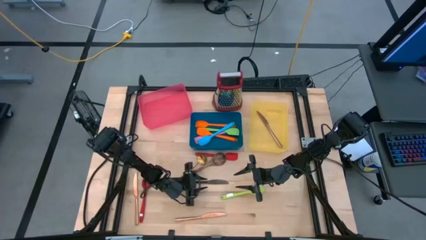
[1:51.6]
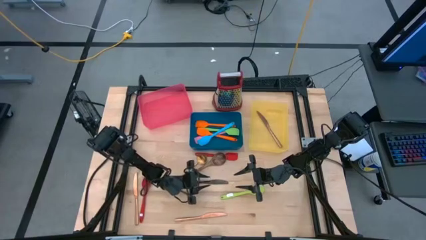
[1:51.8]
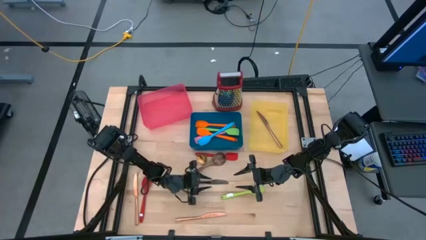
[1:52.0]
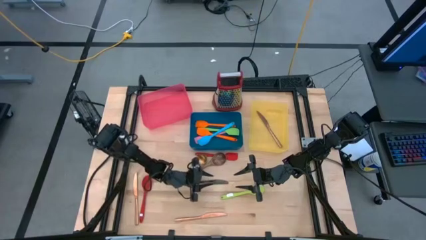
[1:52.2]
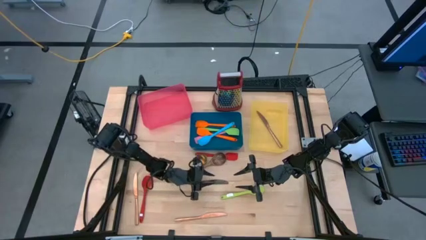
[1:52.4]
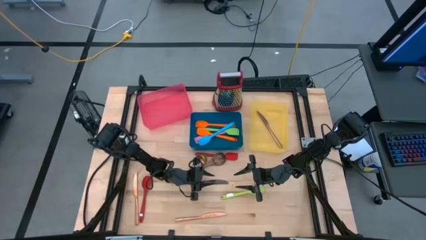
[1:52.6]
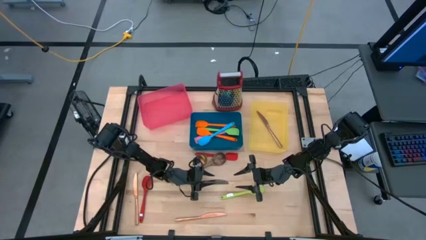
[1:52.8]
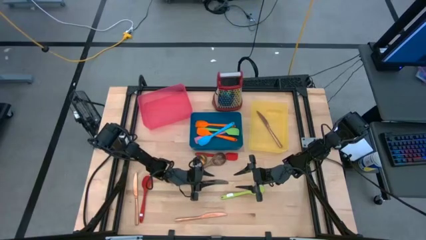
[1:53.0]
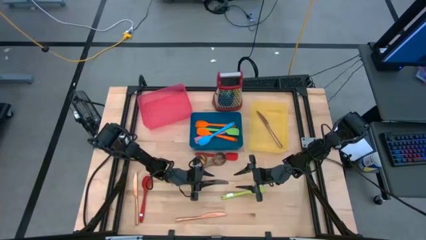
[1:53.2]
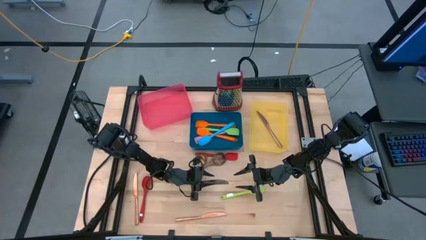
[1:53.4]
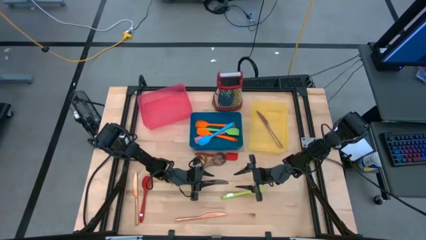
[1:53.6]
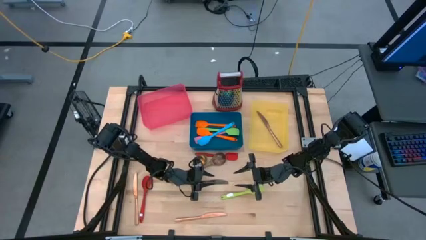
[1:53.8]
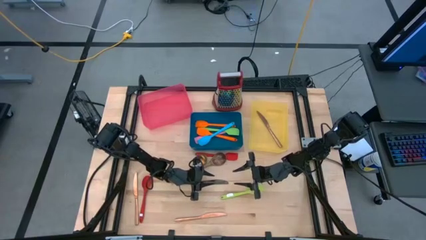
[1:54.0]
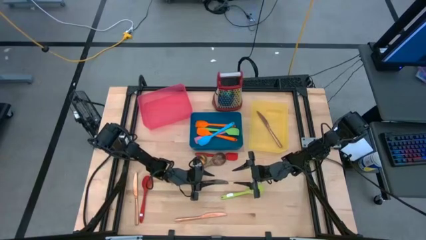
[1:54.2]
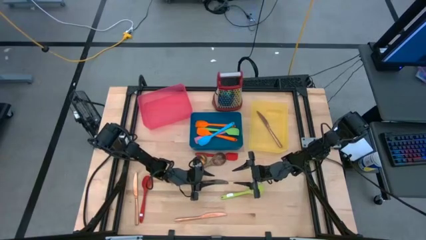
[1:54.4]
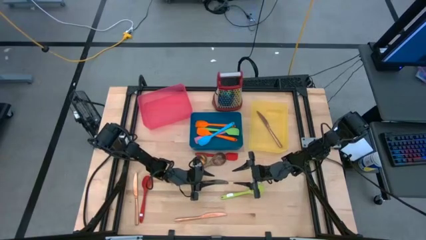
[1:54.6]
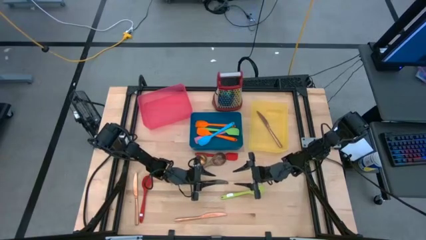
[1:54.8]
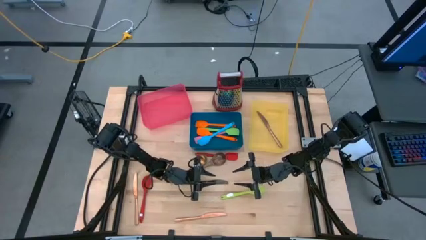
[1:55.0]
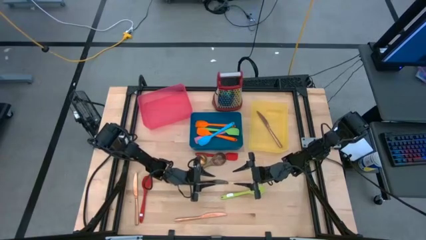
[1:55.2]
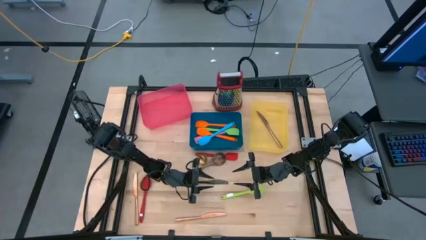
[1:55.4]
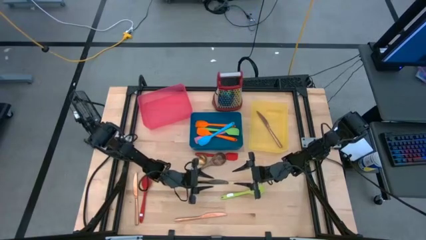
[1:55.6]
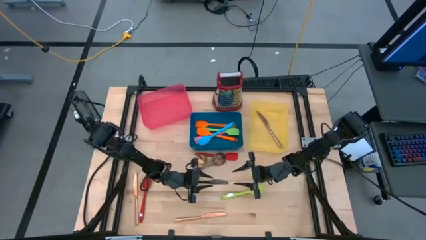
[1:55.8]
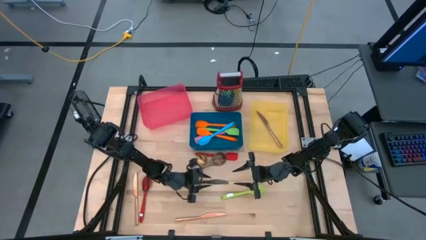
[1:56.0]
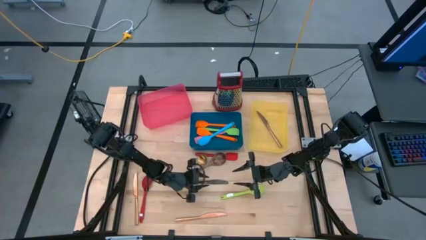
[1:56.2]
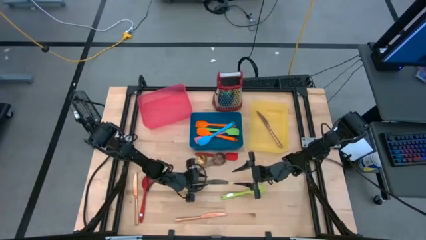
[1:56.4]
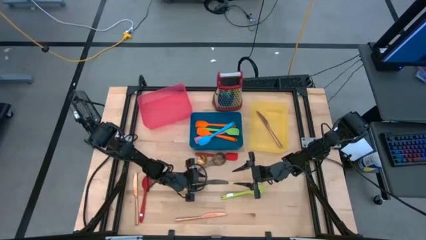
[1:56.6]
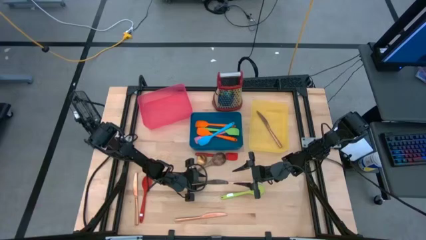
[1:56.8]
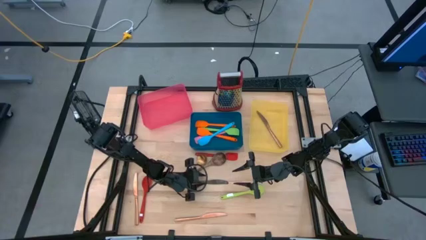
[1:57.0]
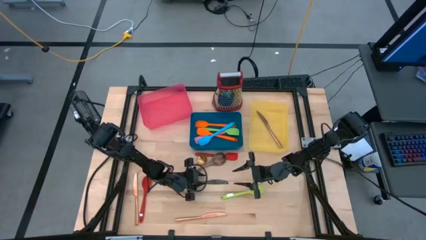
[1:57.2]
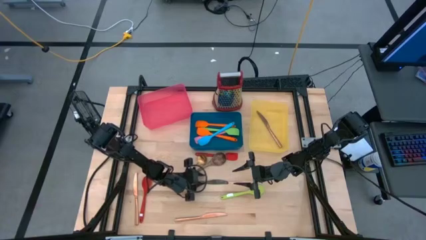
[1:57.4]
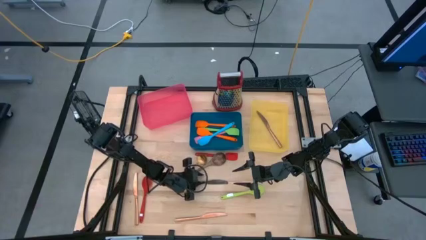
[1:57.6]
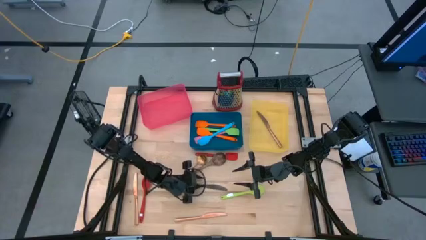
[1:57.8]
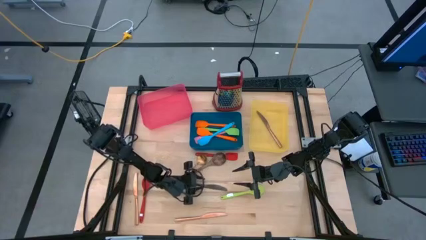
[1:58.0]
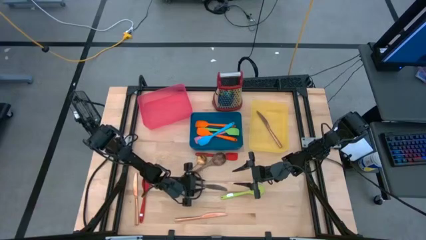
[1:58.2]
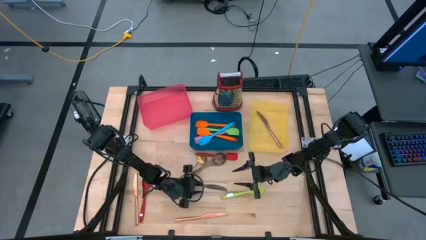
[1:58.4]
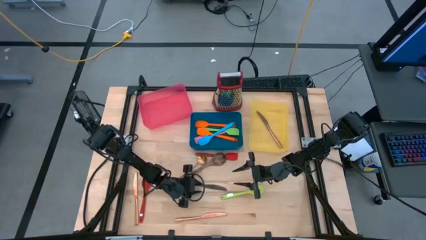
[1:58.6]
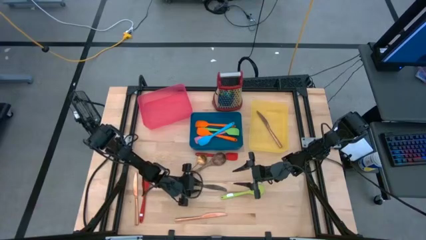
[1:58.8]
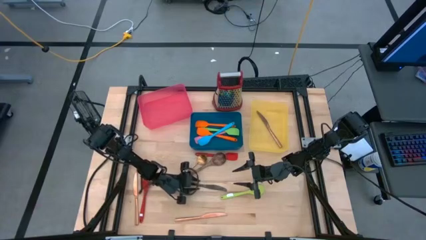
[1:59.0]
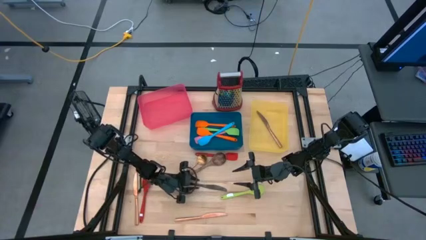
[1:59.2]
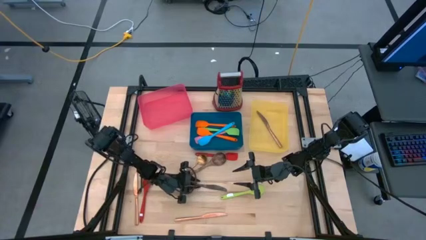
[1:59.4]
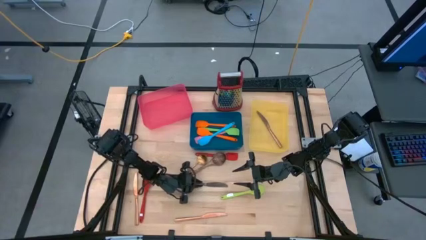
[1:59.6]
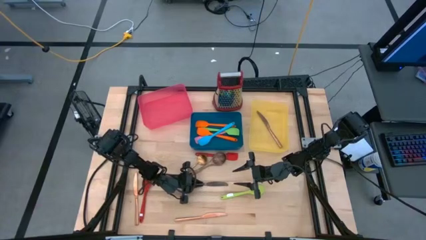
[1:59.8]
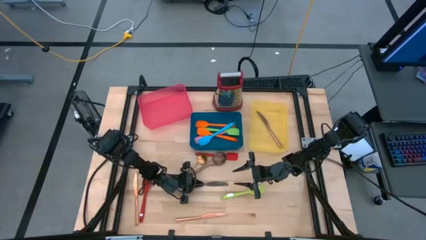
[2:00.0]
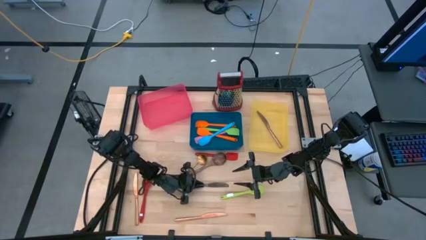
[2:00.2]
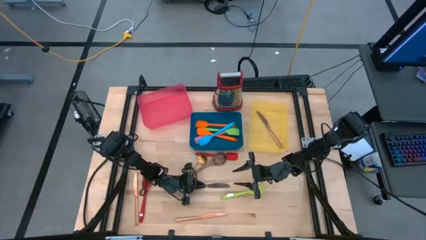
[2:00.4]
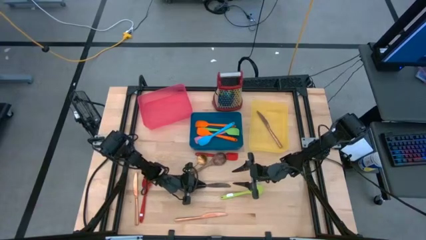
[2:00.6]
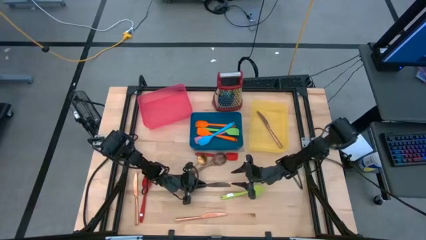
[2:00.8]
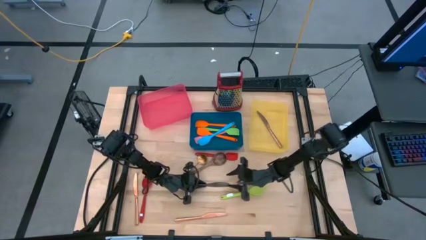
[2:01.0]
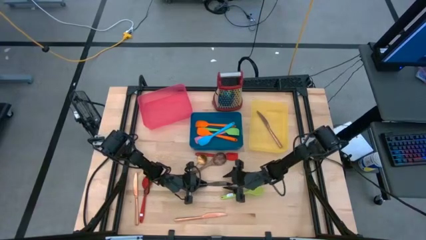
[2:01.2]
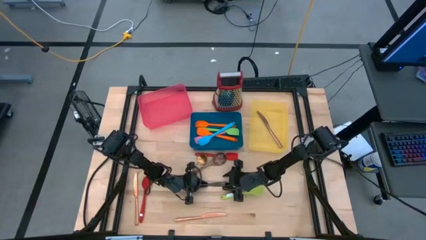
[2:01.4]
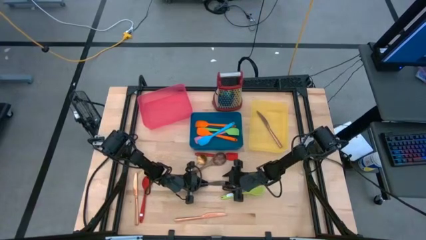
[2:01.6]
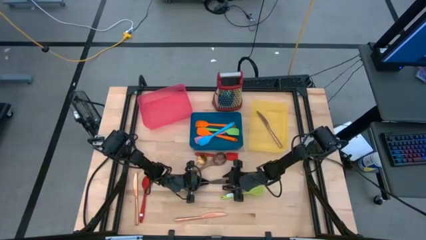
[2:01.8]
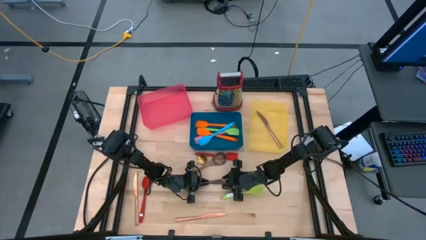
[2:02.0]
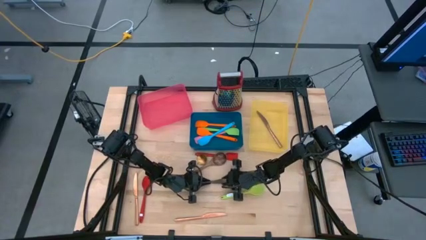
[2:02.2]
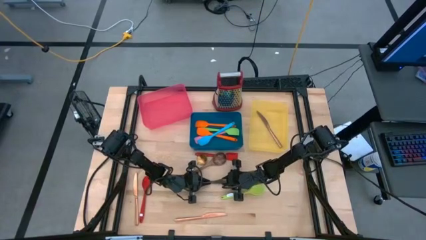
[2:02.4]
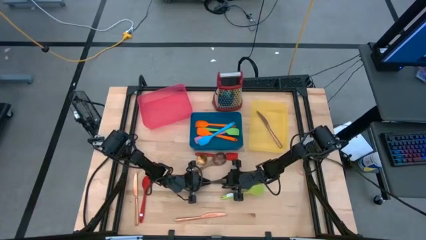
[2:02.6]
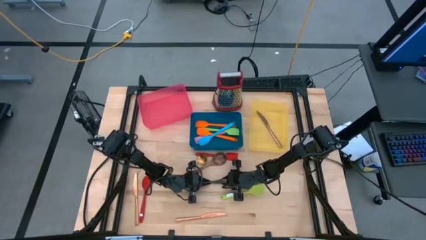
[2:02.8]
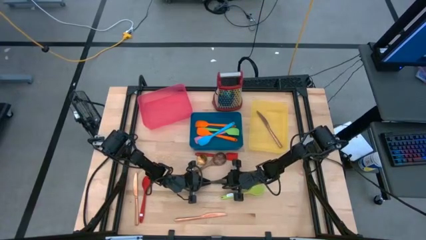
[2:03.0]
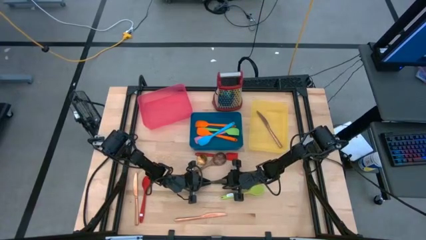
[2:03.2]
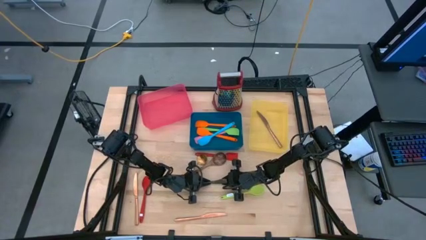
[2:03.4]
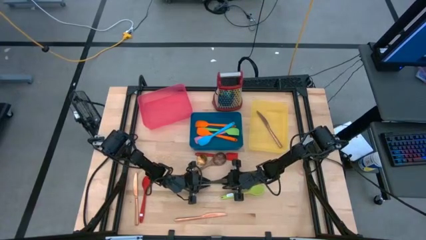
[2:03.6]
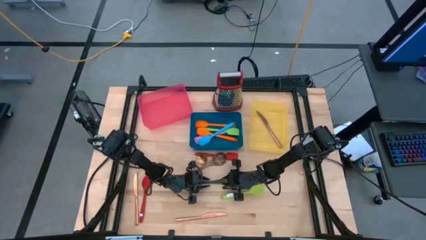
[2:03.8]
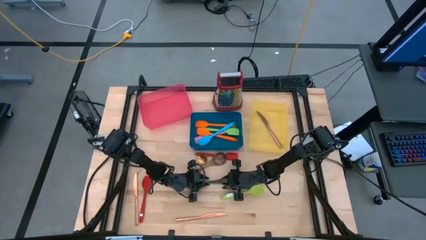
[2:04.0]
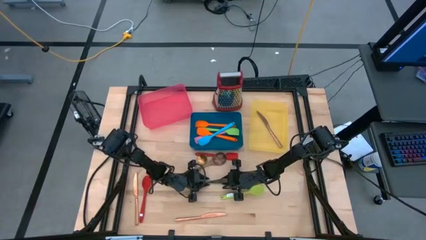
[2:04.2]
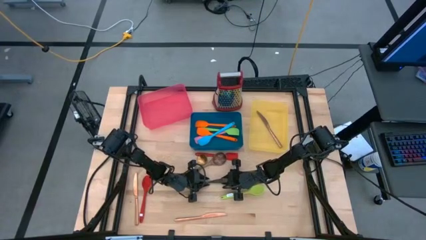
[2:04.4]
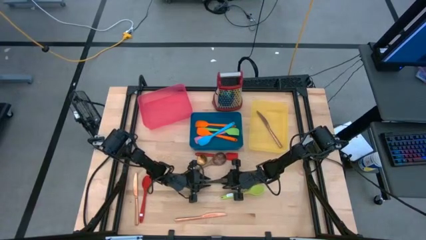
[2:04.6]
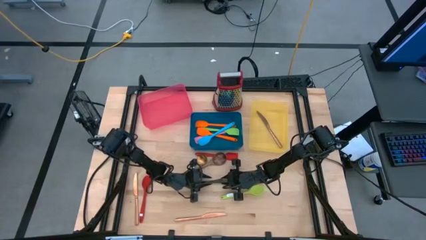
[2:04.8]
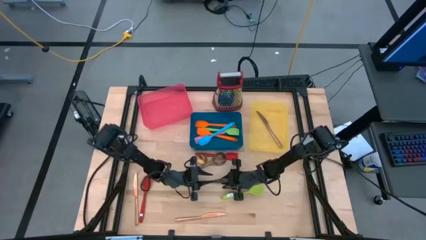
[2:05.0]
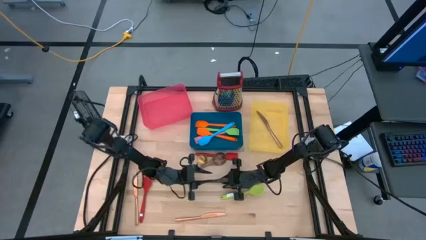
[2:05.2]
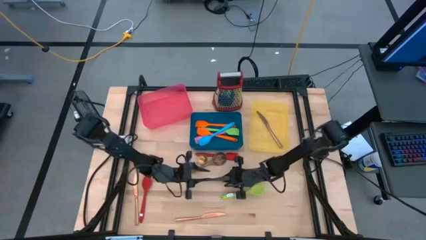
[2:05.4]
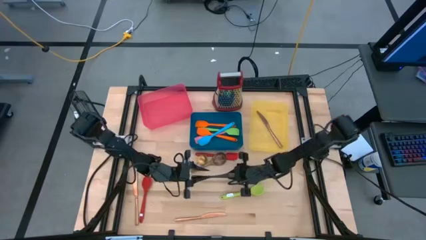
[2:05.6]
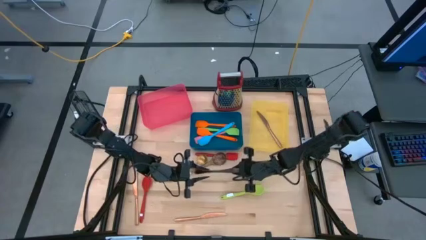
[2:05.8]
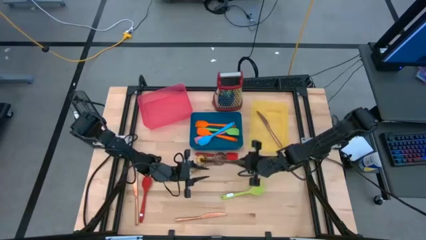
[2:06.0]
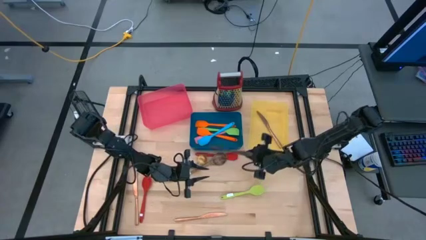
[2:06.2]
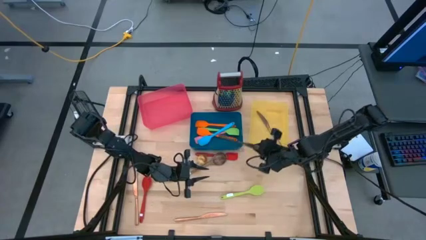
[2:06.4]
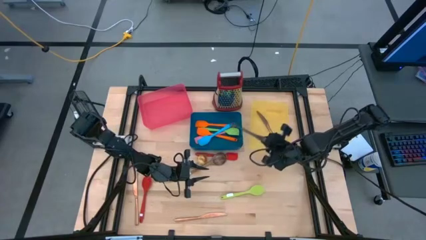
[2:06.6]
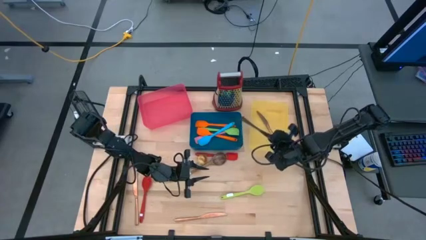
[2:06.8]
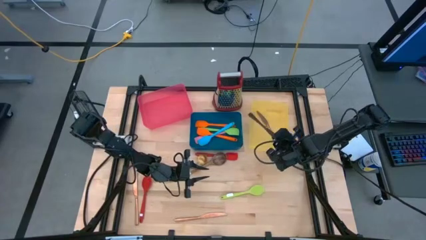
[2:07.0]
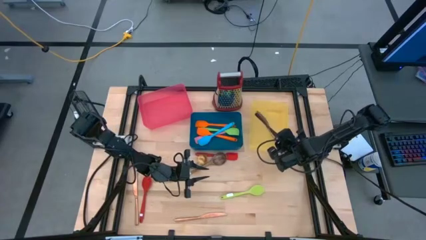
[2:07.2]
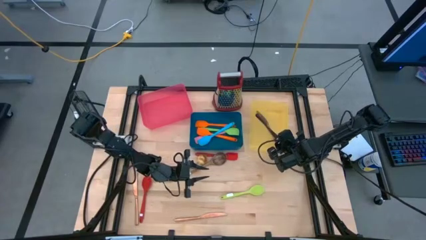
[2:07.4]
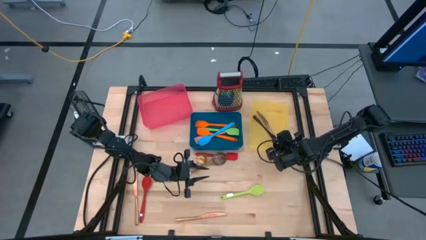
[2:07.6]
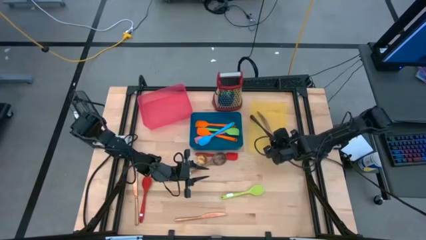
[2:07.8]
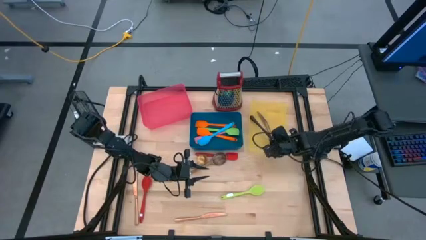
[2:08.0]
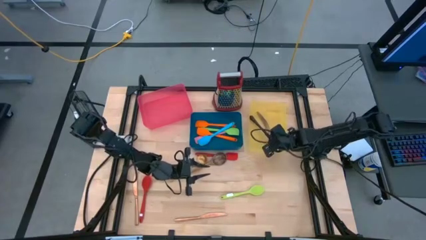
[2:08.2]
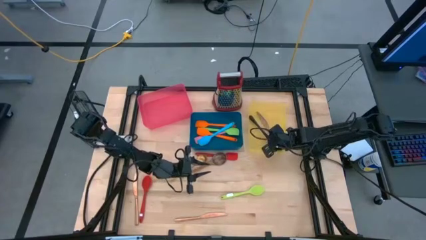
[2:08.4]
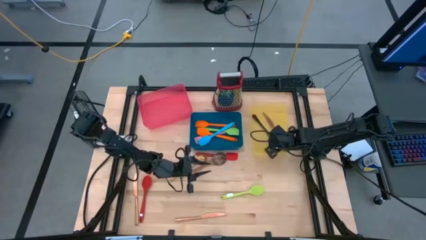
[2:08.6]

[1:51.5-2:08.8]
Task: Pick & Place Kitchen Items
Put the black table knife into the yellow bin
